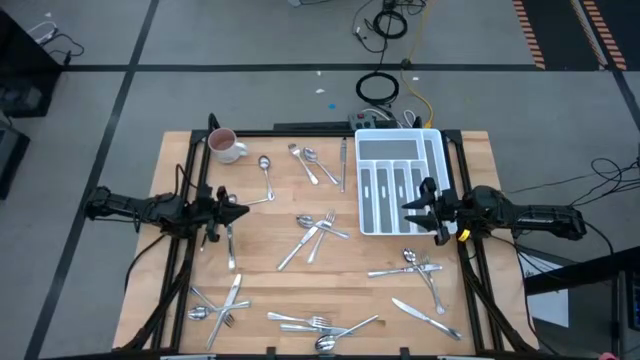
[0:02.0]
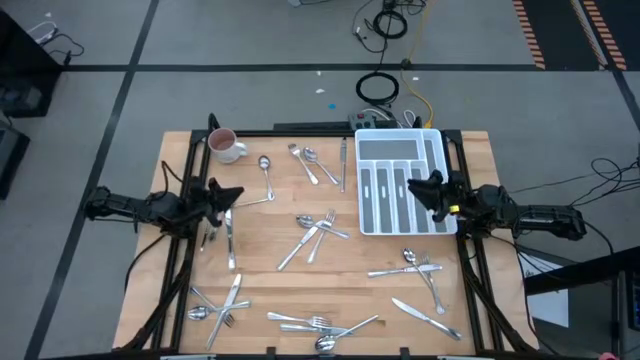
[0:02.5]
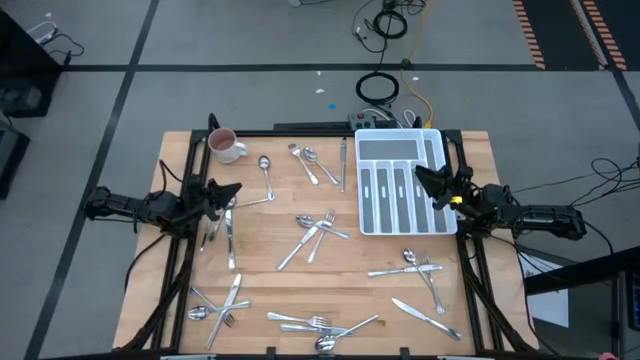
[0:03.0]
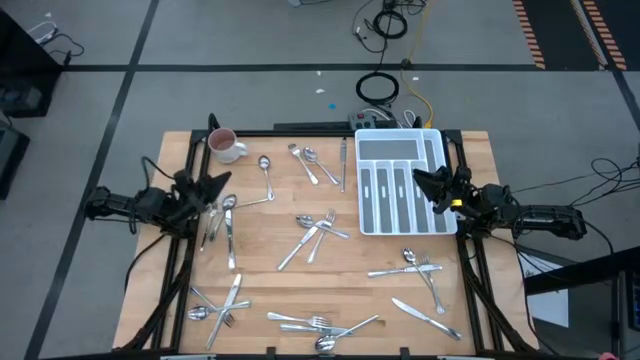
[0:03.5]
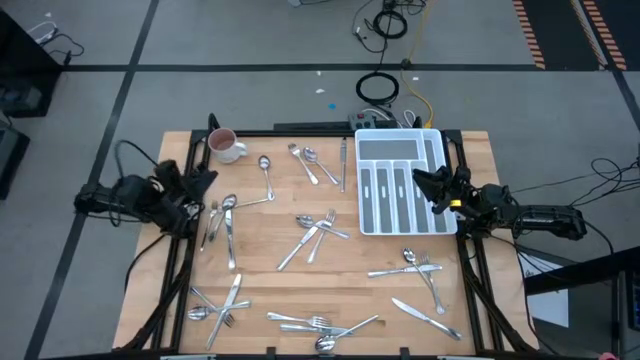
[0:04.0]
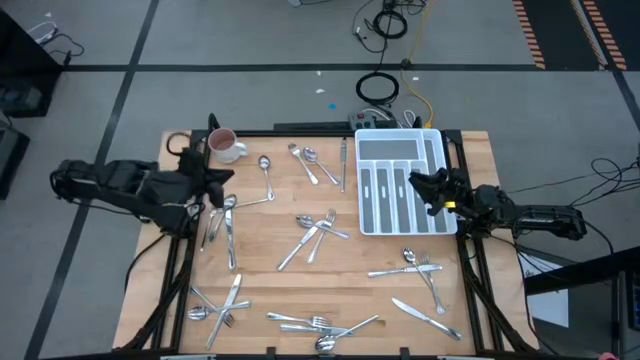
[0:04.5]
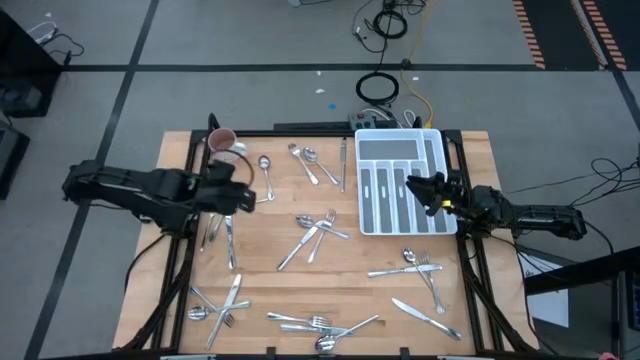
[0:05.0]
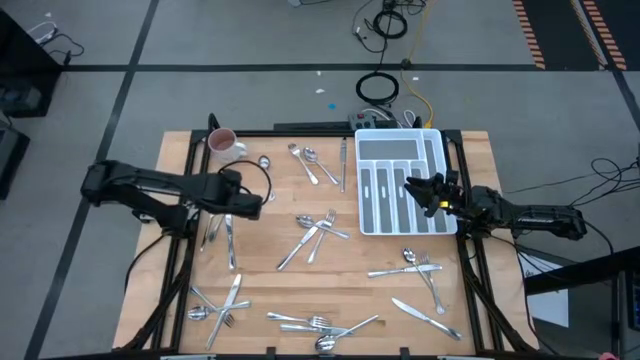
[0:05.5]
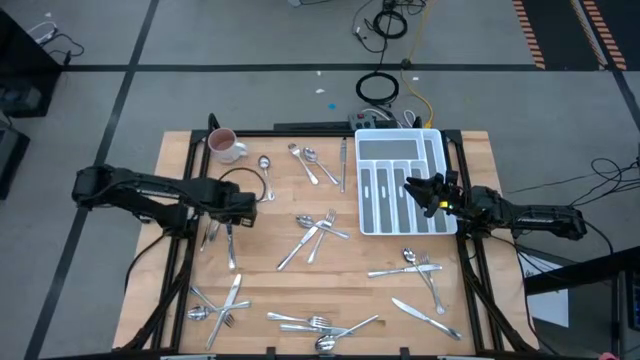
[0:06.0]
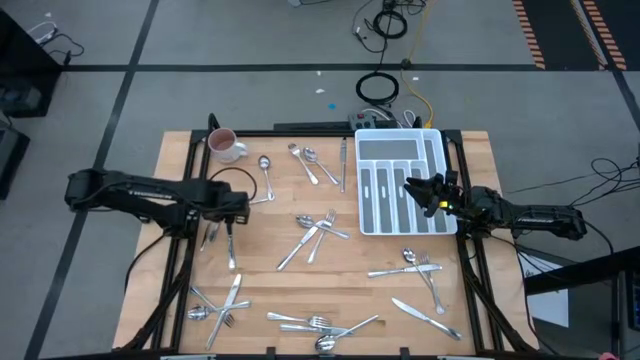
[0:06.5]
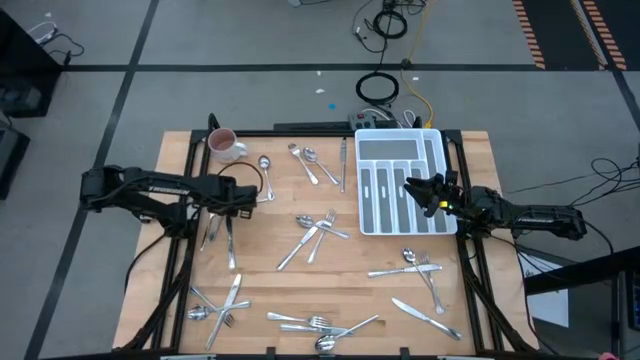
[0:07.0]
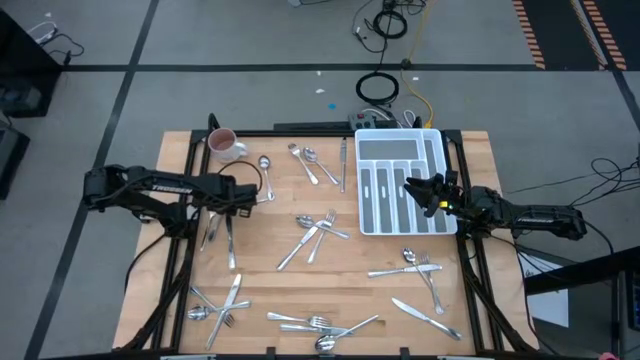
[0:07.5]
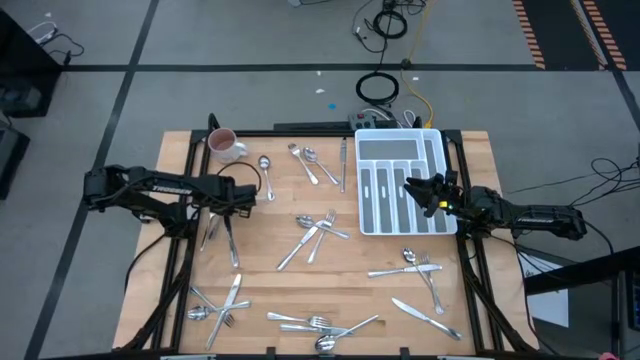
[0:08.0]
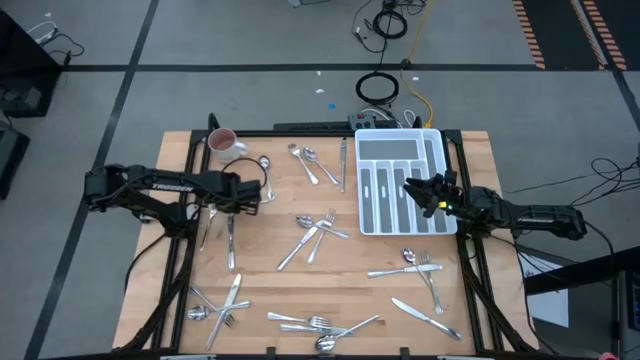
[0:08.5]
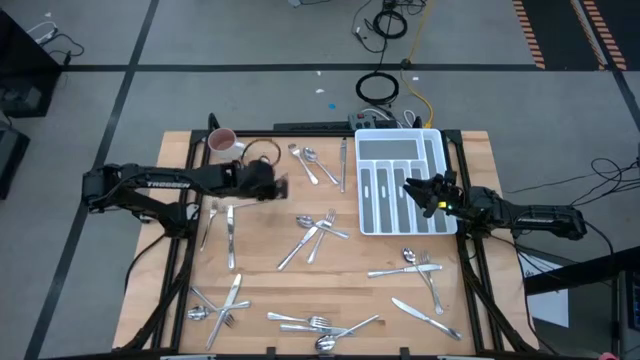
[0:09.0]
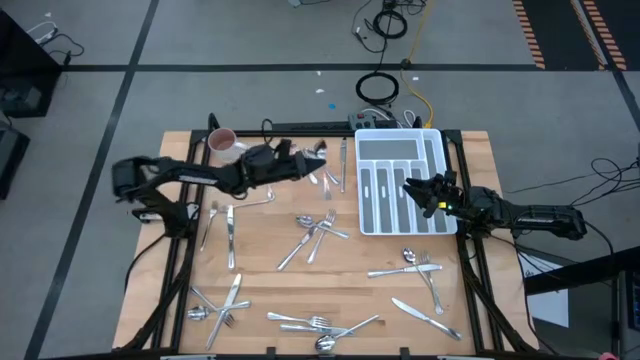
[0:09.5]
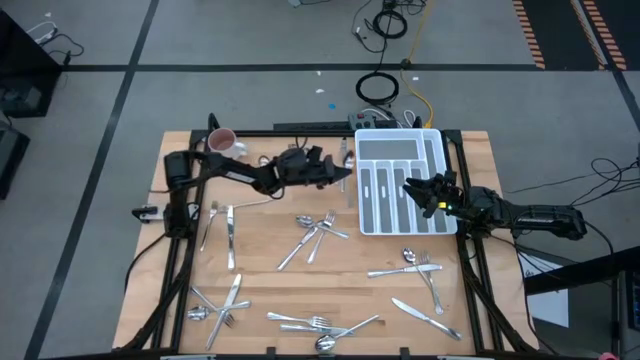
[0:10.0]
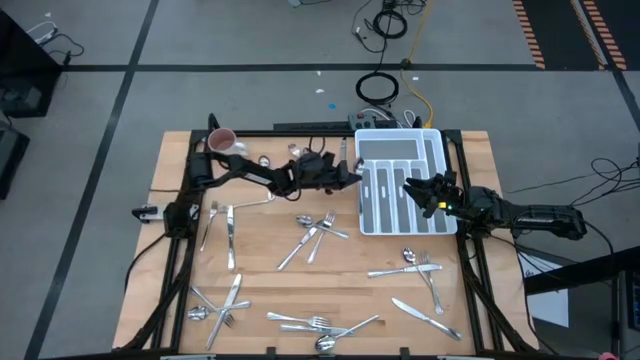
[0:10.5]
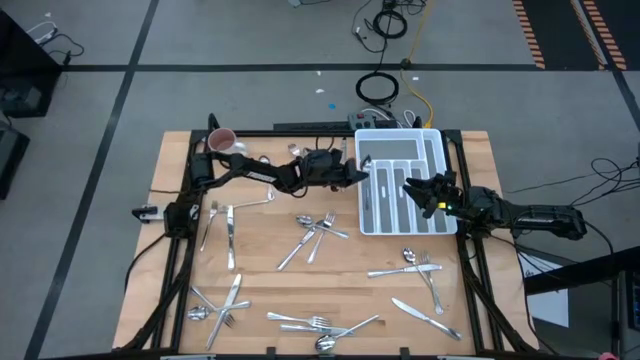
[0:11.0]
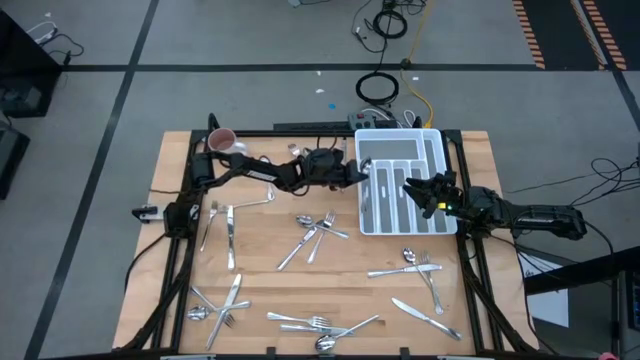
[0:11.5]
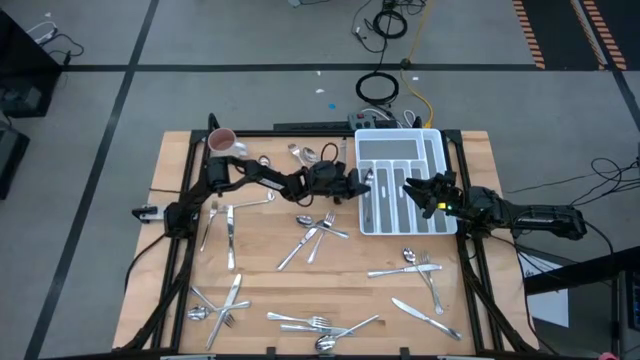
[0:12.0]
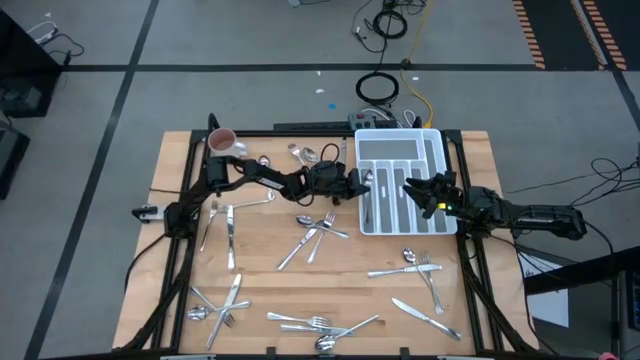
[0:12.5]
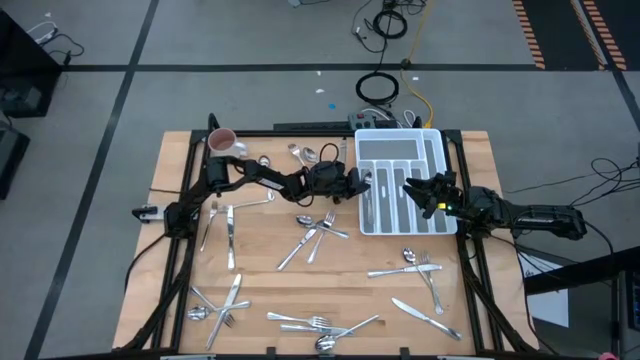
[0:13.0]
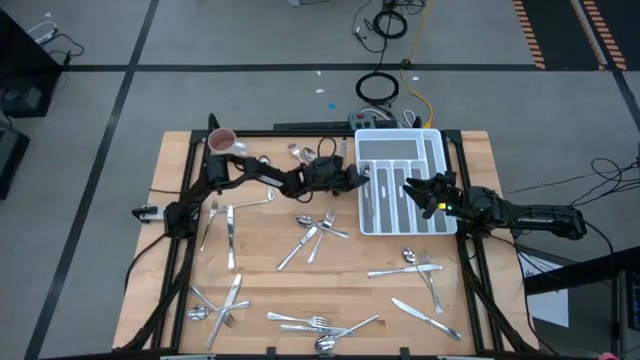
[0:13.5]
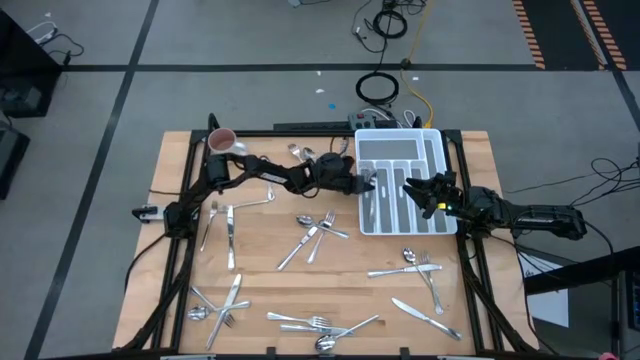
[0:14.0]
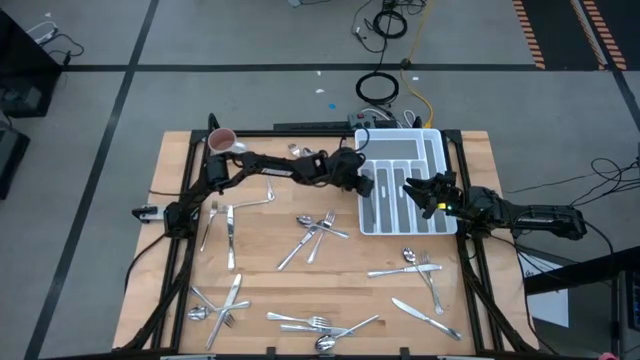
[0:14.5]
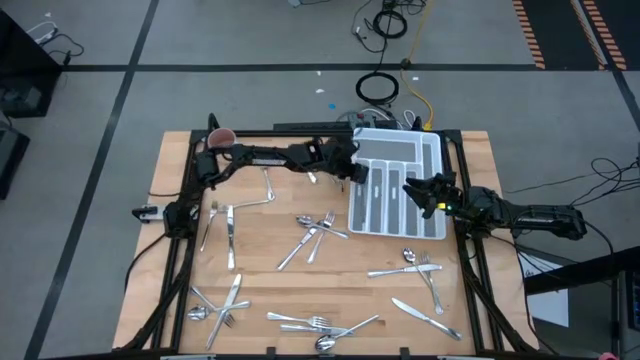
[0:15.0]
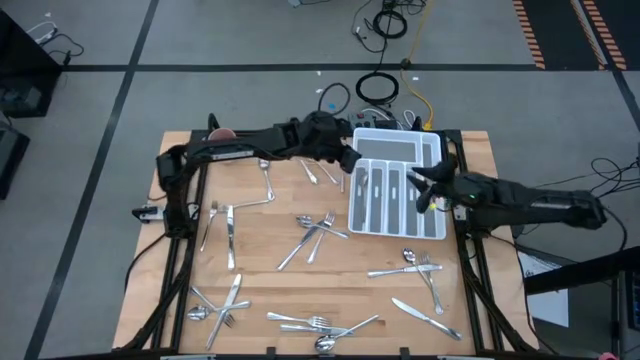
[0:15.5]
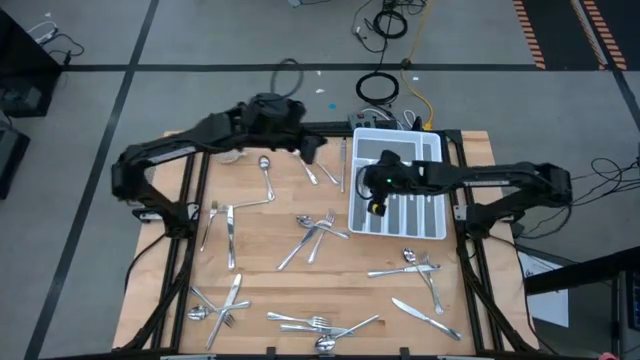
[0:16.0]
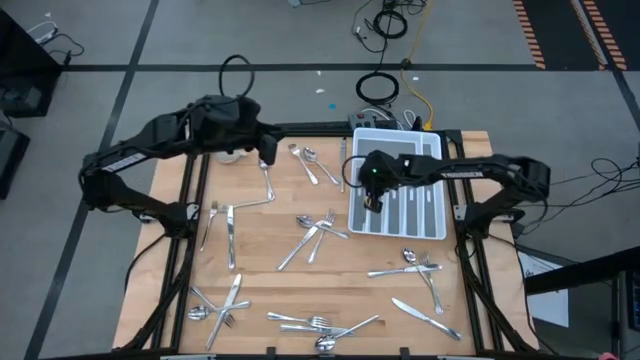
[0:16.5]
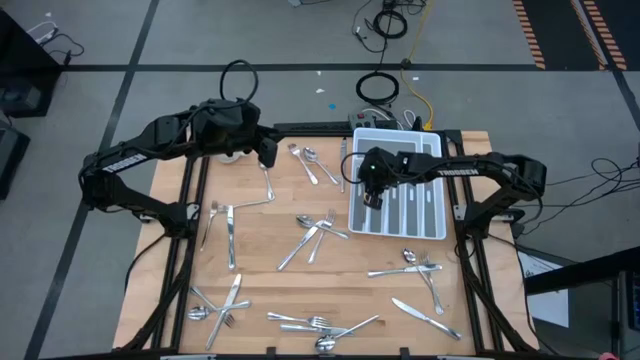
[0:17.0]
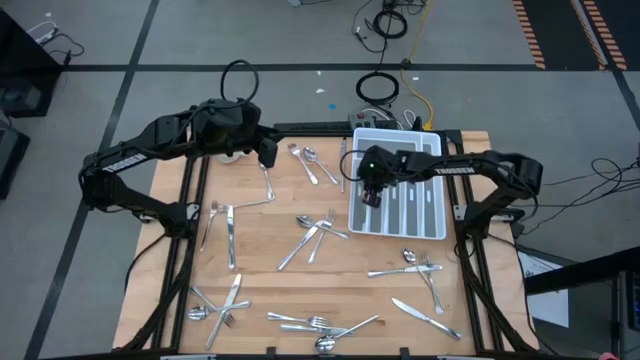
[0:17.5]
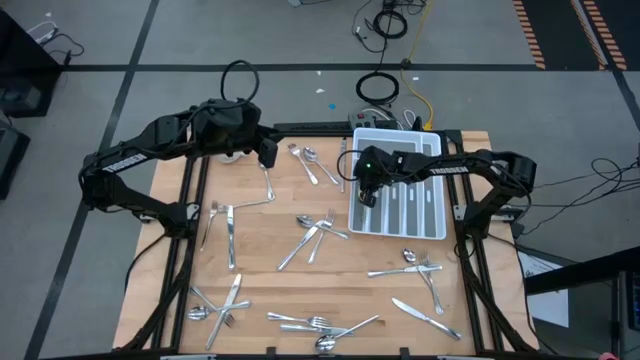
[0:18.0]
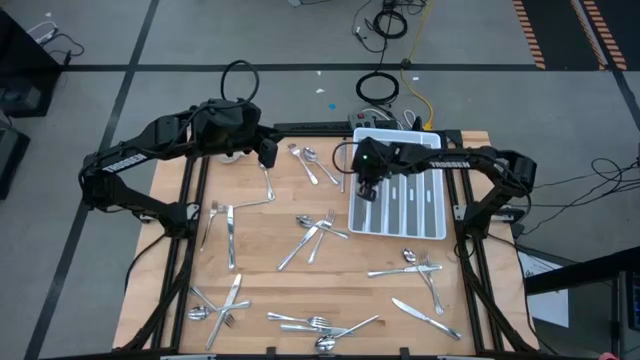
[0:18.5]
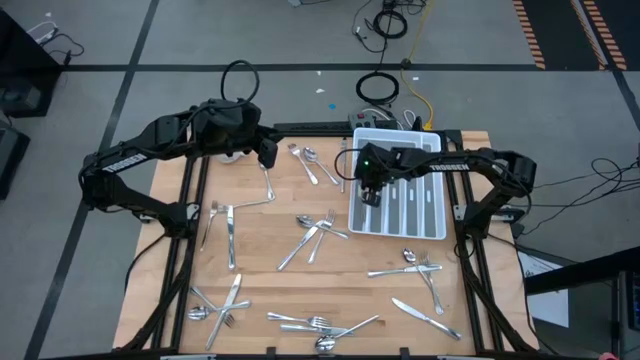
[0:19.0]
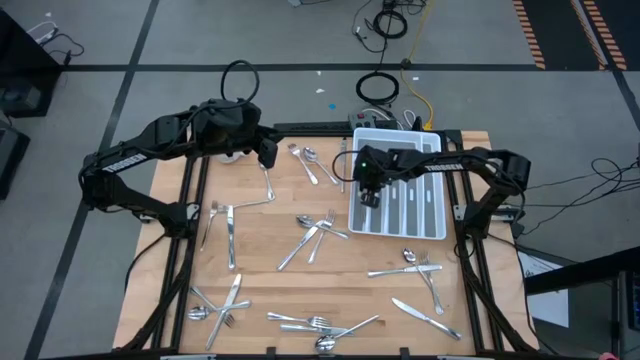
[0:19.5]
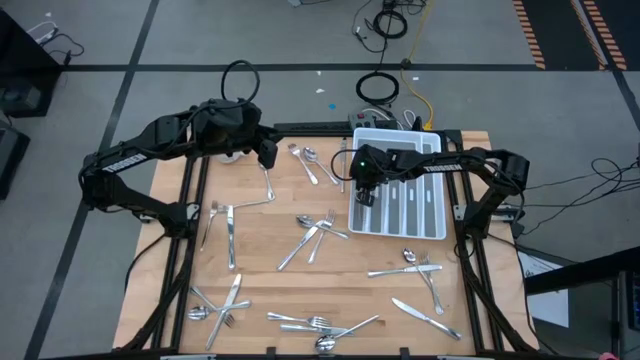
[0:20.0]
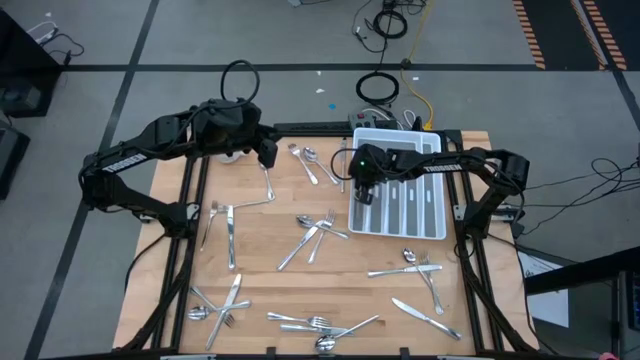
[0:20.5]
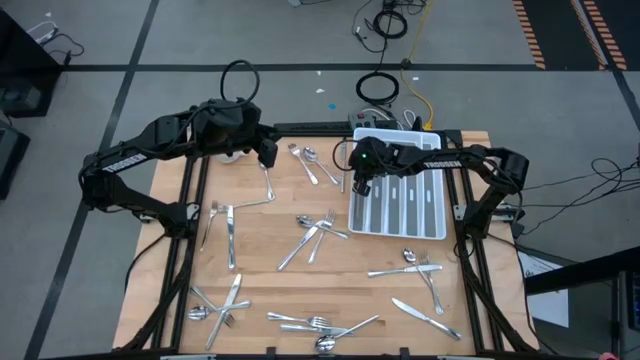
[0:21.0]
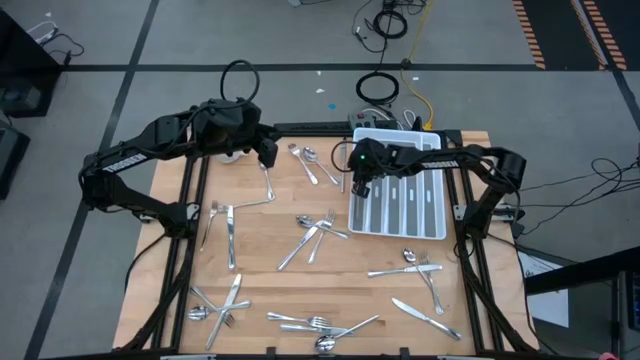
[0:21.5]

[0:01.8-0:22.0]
Task: Sort silverware
Put the silver spoon into the silverware tray

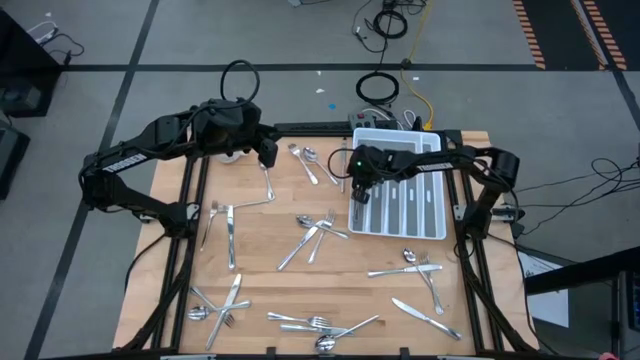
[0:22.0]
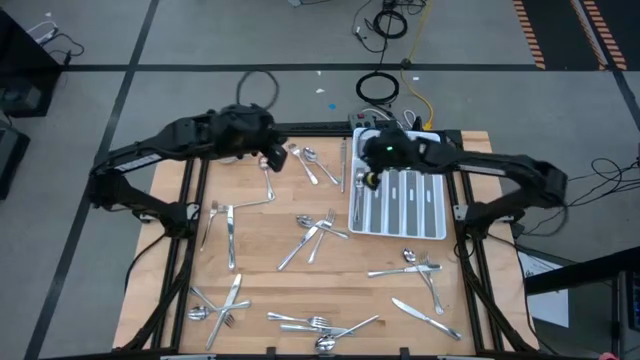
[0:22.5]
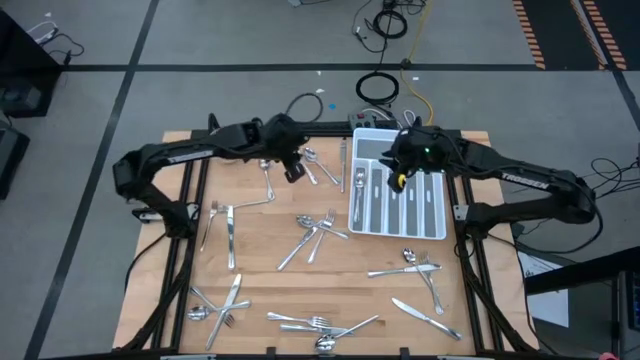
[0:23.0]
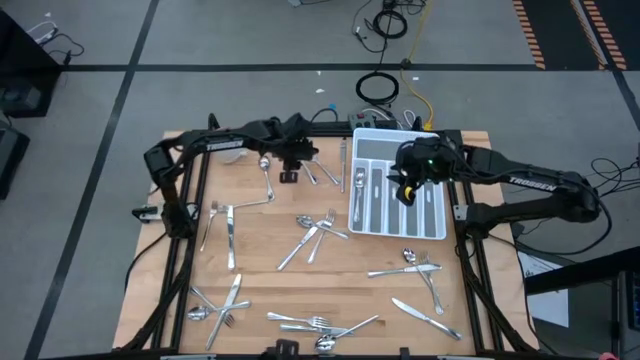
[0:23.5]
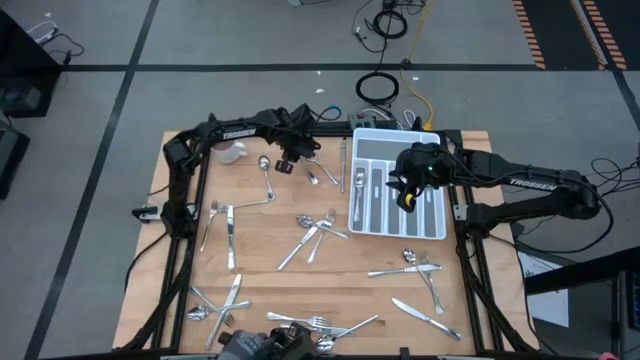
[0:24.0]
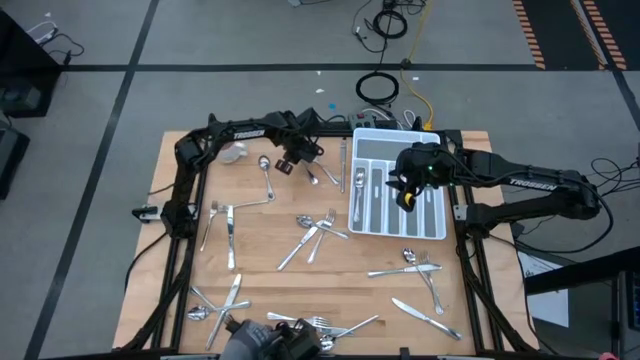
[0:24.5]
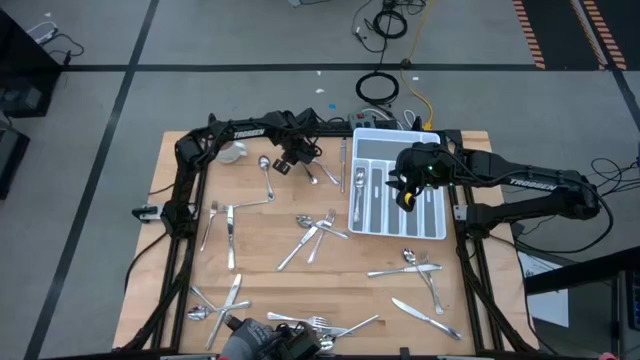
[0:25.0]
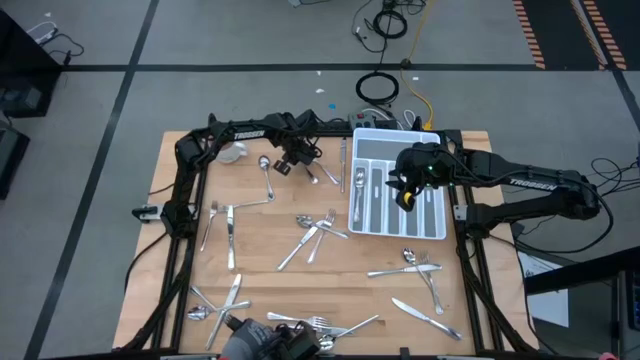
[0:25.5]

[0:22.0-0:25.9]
Put the silver fork into the silverware tray
